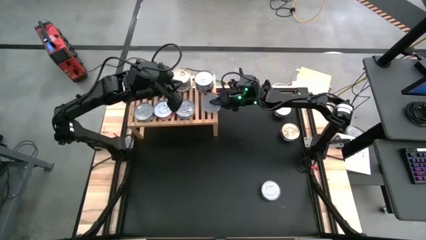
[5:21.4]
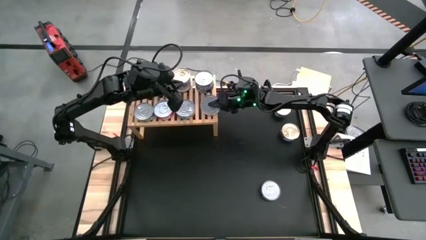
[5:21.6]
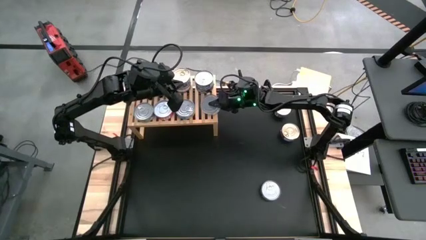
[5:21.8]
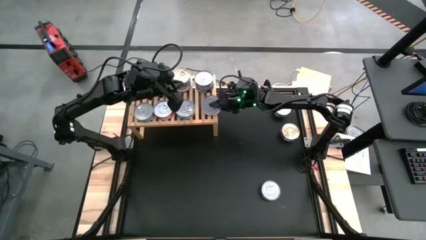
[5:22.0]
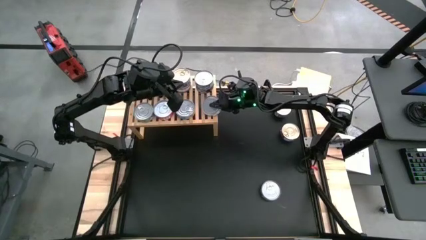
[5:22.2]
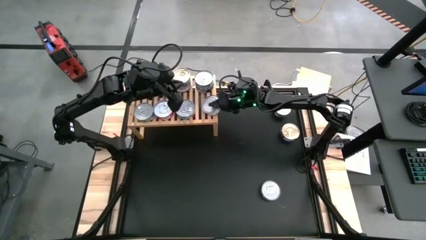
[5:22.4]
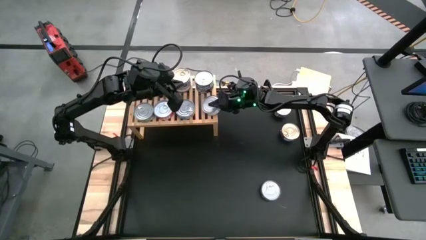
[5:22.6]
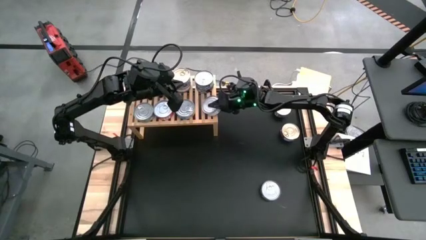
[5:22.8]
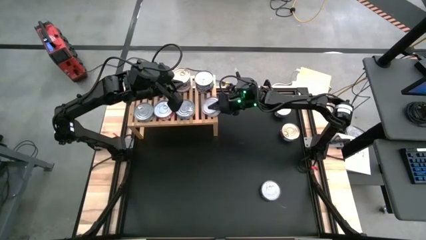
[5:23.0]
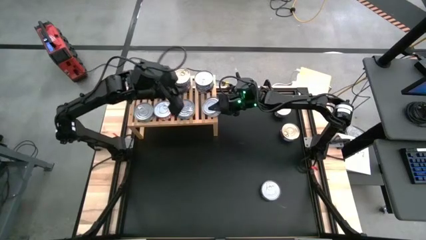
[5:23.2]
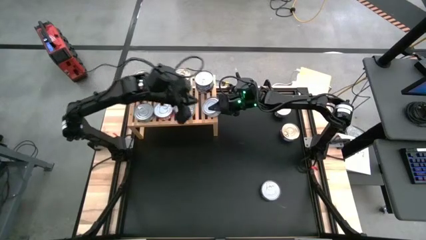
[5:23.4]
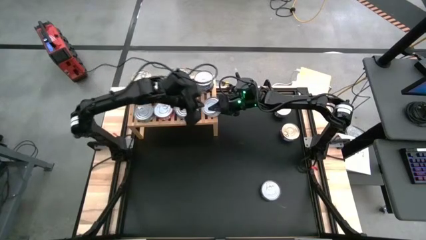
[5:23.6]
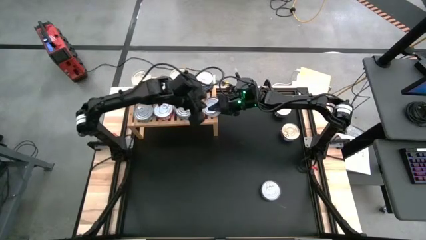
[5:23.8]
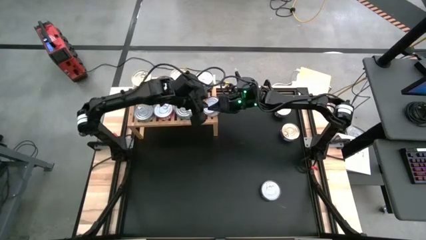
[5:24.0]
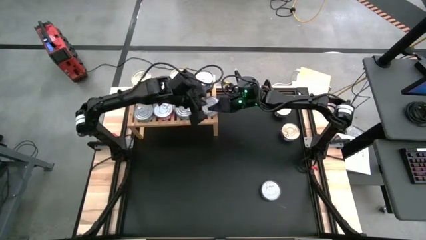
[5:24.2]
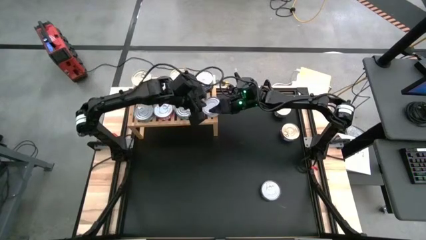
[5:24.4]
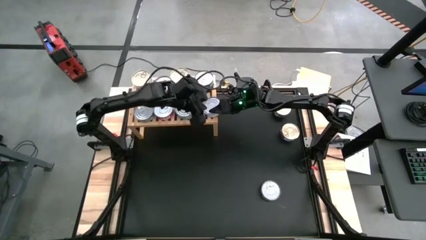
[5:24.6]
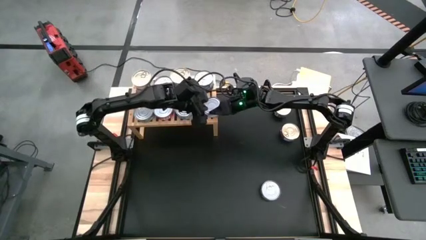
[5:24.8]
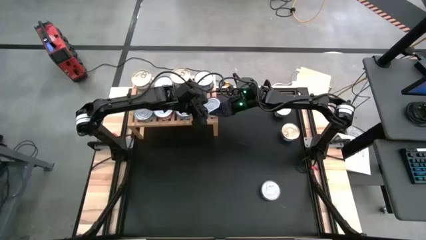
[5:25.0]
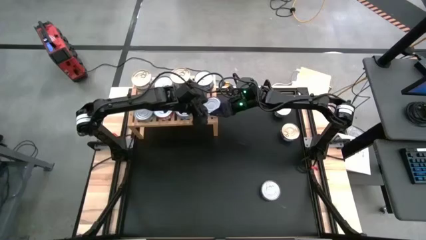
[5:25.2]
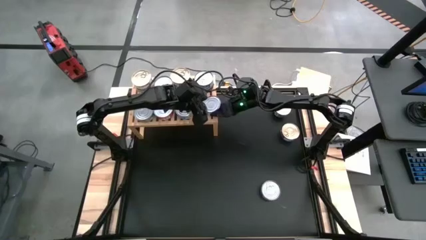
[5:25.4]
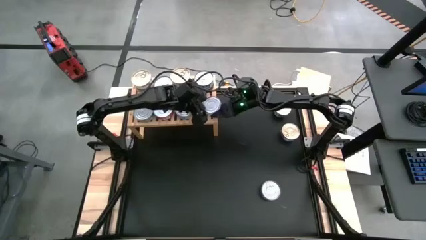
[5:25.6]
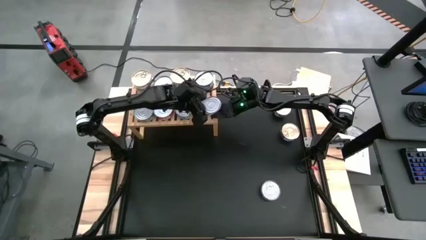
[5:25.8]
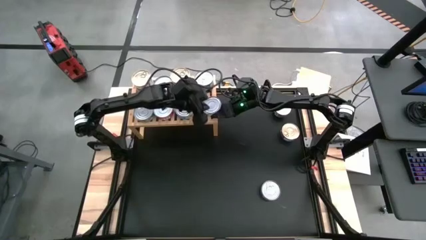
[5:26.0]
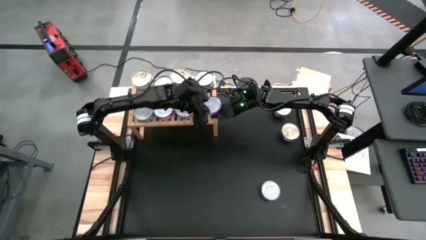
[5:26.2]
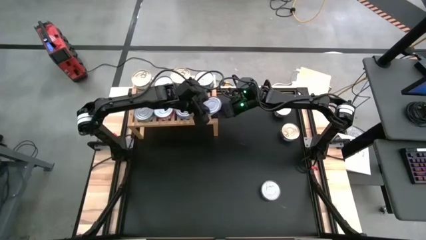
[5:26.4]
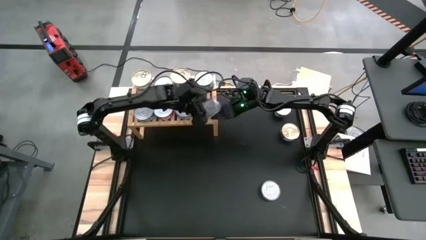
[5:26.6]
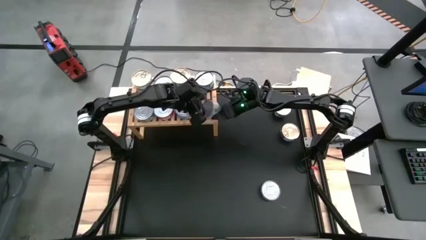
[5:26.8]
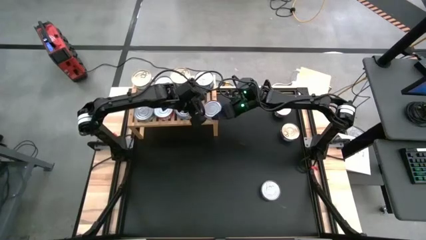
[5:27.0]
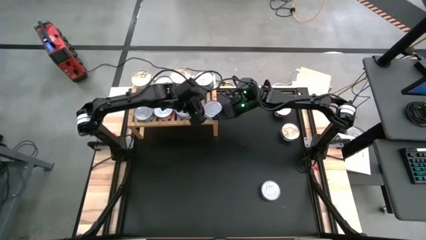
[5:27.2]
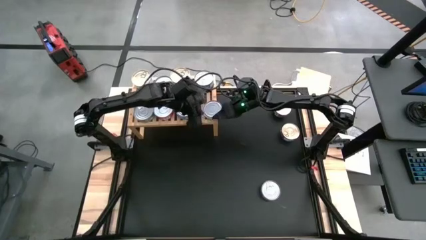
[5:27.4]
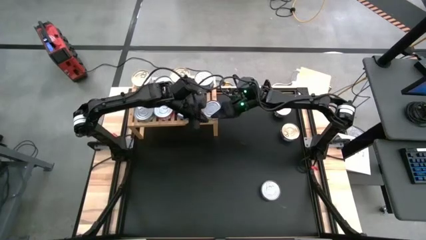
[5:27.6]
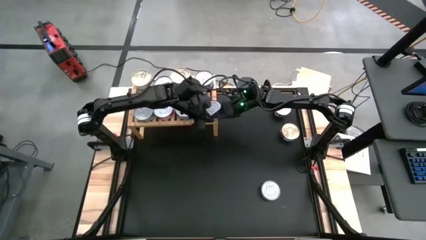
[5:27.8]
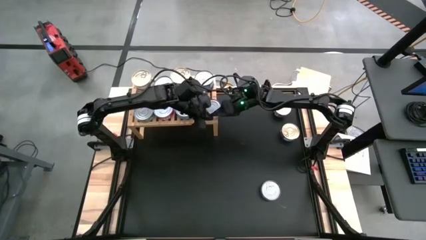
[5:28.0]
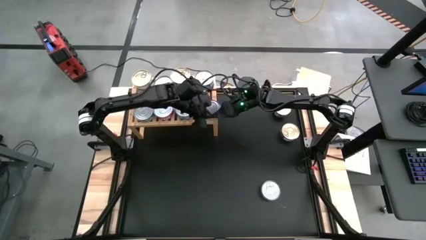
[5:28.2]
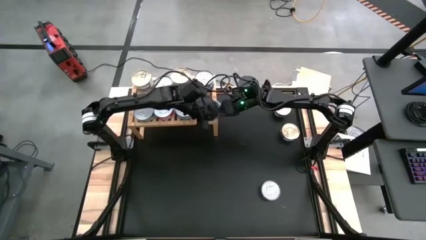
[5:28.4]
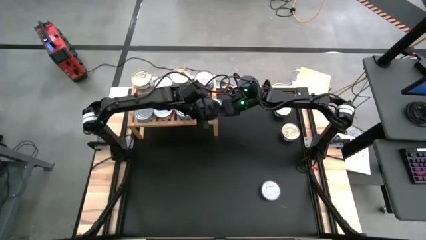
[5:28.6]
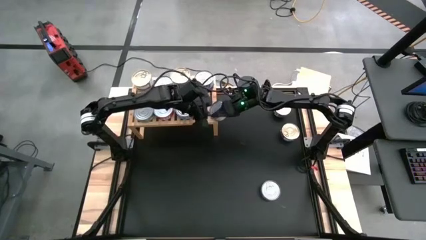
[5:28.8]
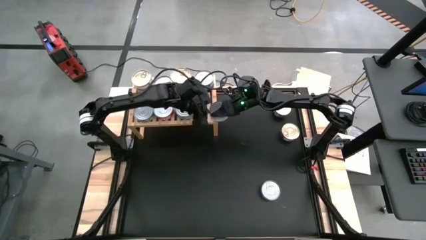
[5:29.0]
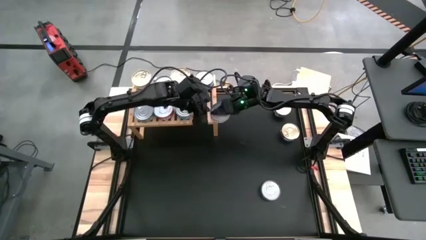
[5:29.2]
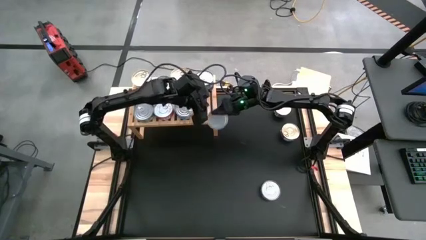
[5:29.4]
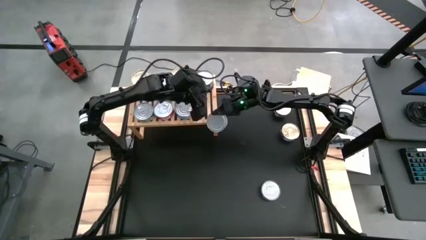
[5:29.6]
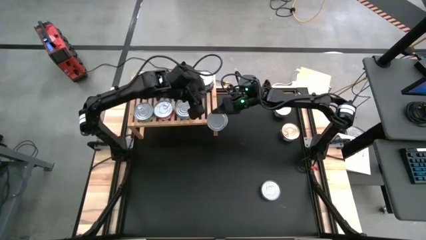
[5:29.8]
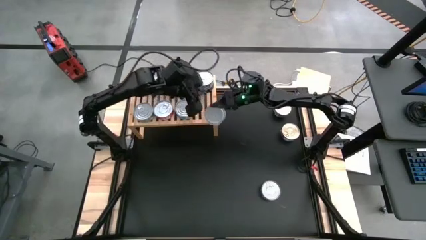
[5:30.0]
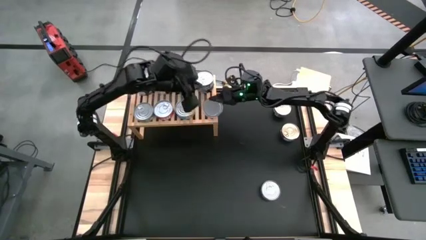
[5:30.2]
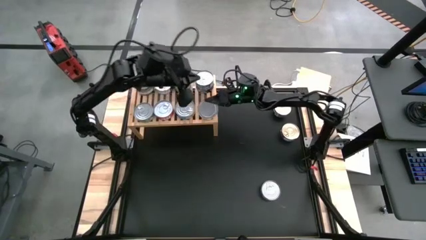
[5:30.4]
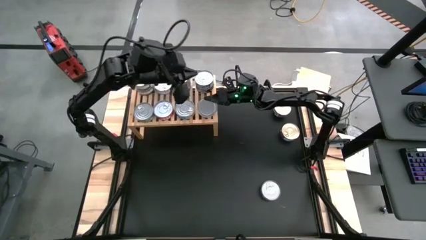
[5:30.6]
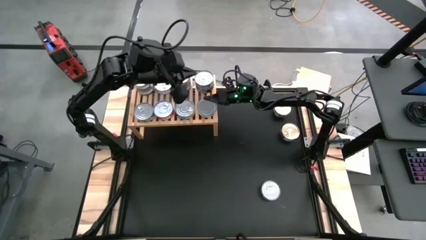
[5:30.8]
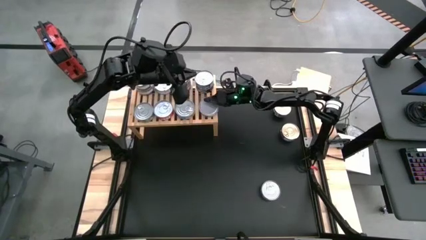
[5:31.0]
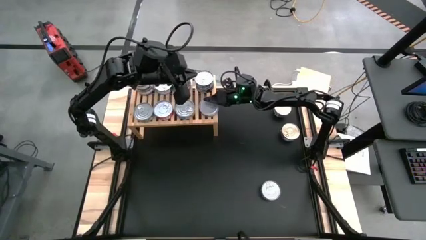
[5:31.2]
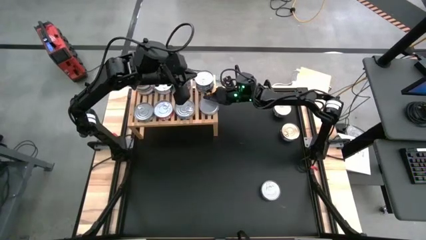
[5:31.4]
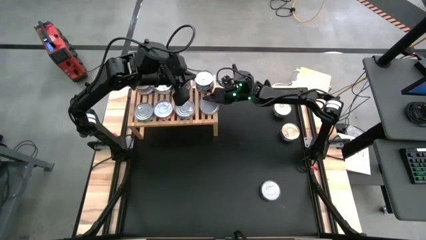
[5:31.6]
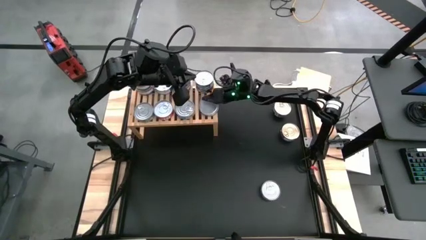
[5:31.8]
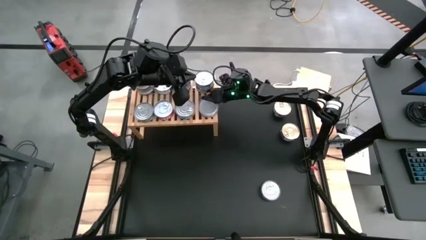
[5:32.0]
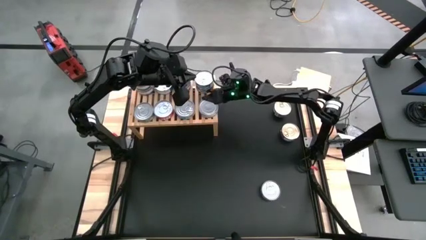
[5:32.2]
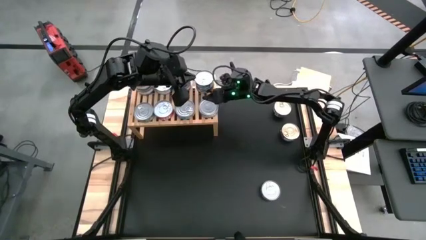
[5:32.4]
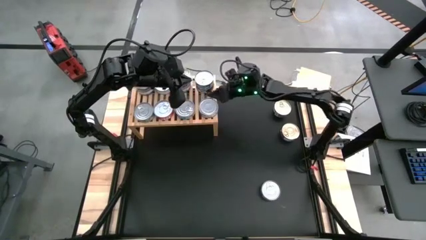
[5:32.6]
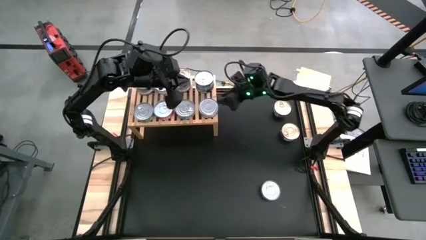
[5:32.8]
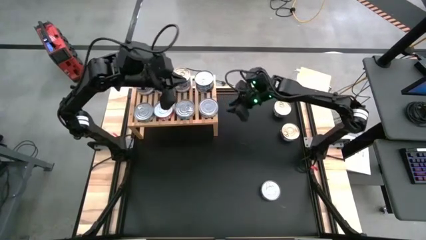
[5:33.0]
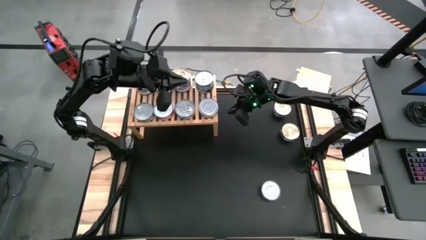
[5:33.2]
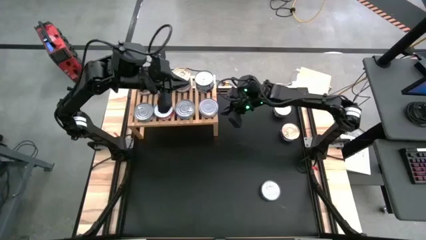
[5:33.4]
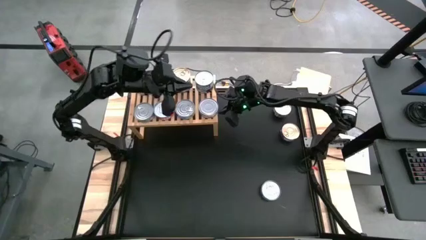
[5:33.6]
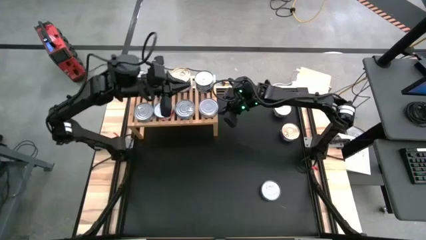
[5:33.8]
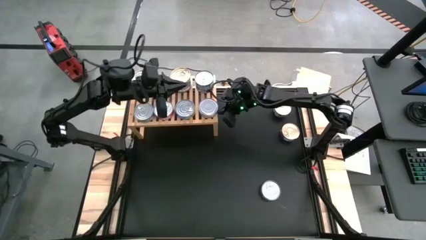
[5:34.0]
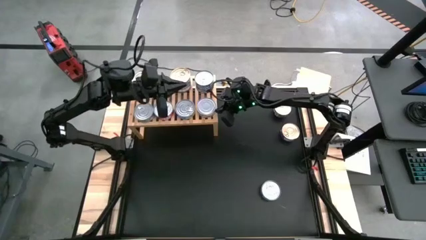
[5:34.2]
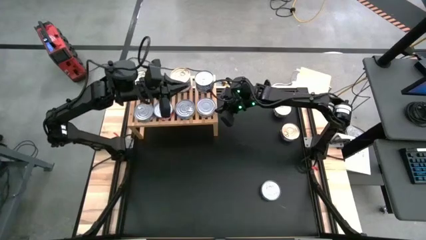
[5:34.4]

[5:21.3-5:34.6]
Task: Stack canned seafood by type on shelf
Put the green tuna can on the shelf
